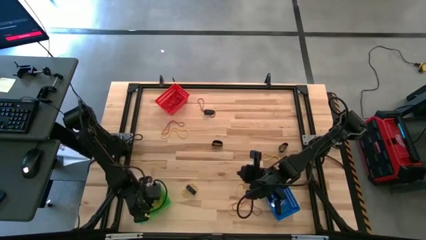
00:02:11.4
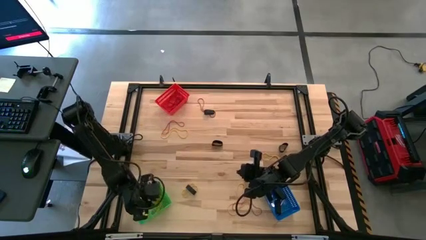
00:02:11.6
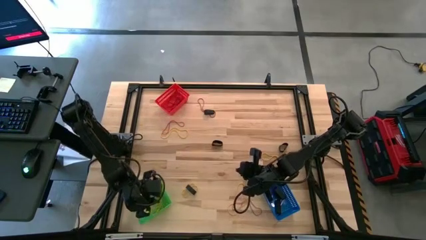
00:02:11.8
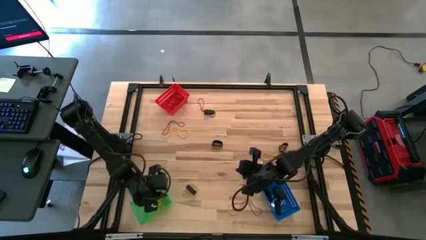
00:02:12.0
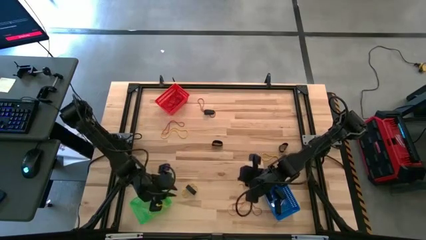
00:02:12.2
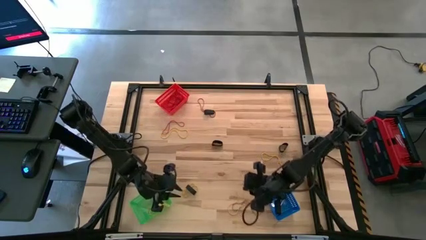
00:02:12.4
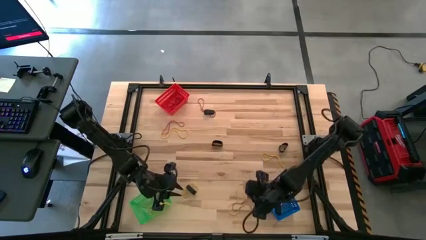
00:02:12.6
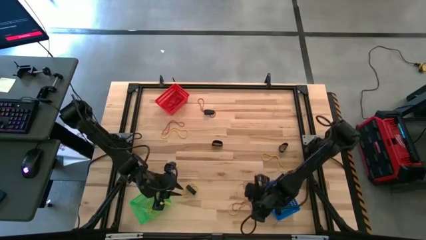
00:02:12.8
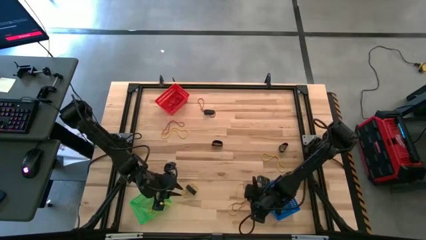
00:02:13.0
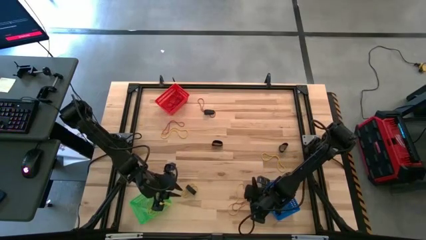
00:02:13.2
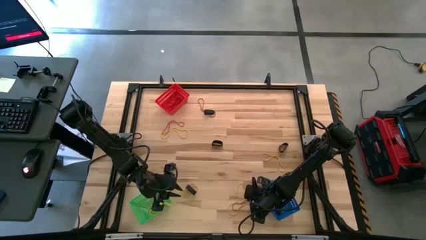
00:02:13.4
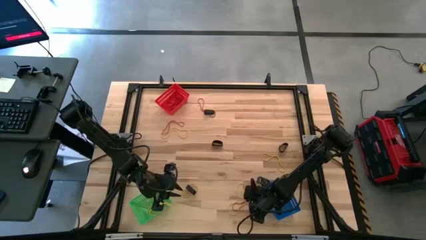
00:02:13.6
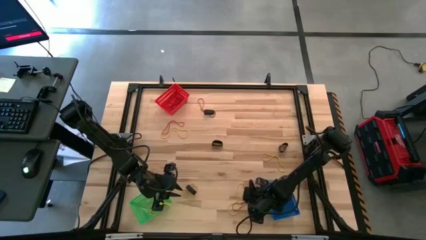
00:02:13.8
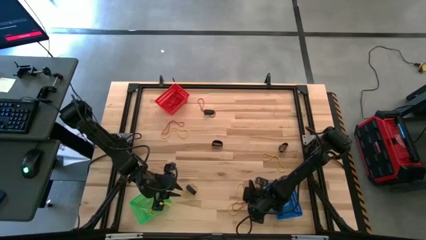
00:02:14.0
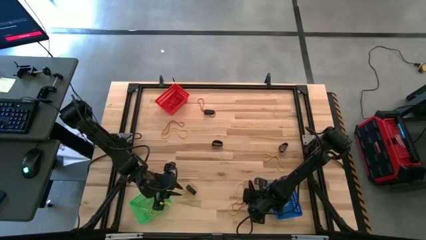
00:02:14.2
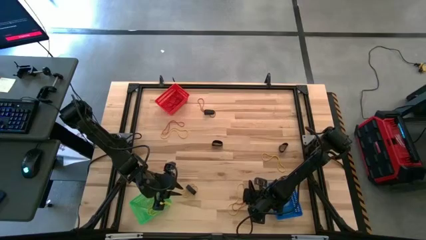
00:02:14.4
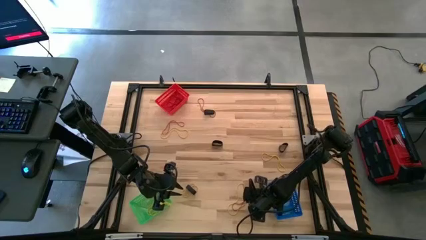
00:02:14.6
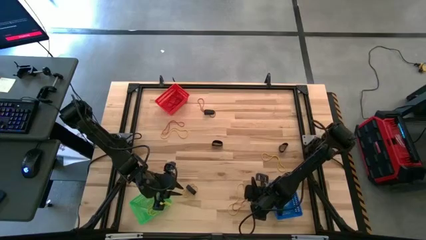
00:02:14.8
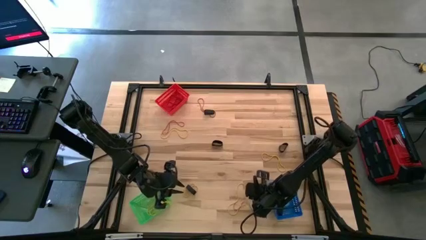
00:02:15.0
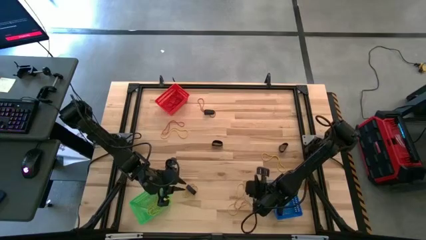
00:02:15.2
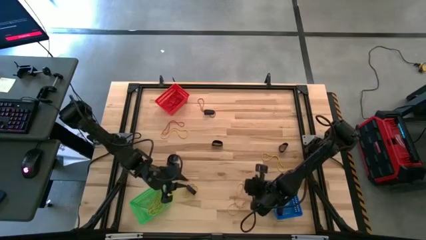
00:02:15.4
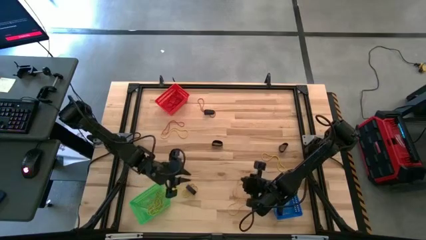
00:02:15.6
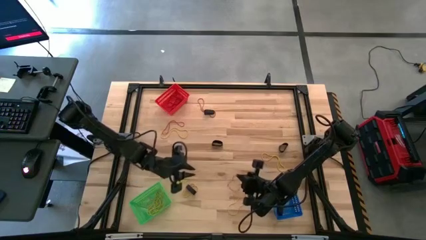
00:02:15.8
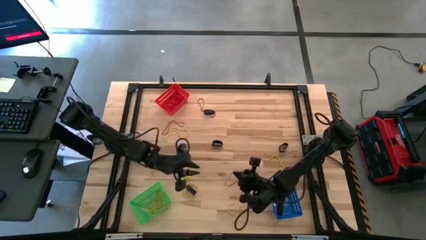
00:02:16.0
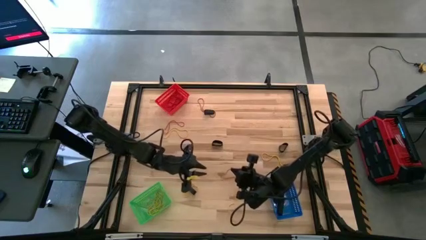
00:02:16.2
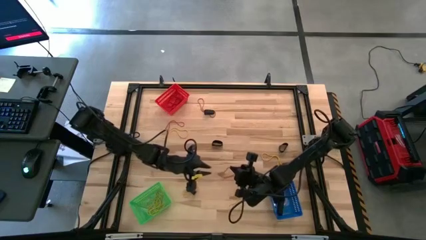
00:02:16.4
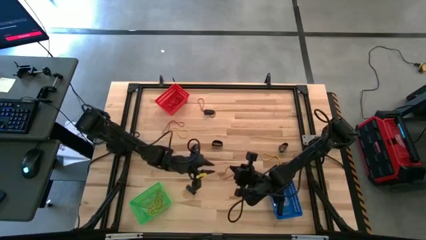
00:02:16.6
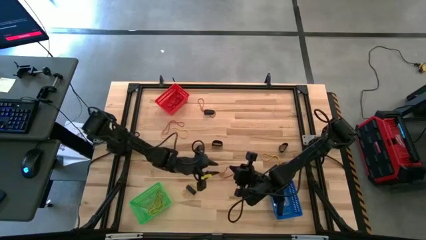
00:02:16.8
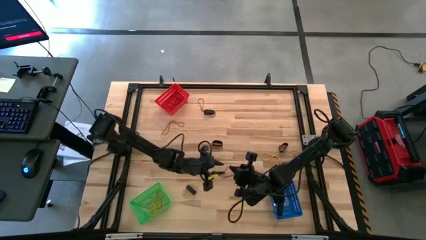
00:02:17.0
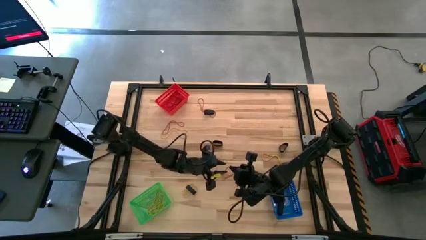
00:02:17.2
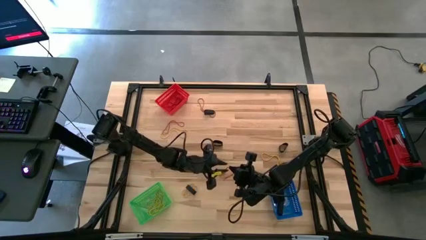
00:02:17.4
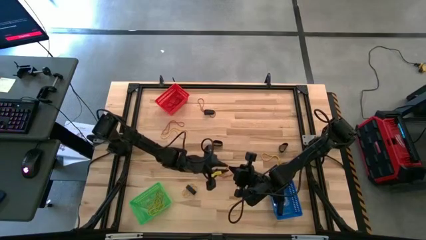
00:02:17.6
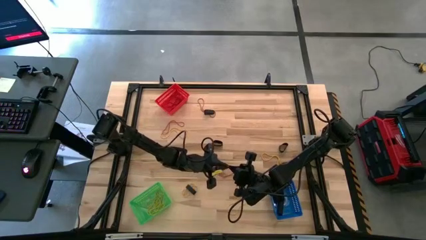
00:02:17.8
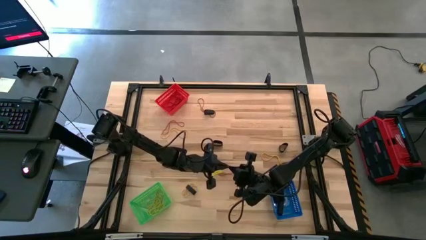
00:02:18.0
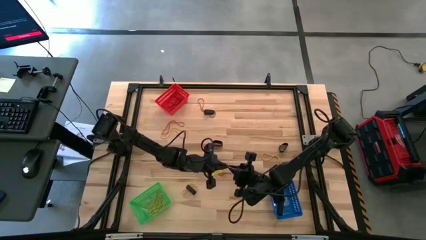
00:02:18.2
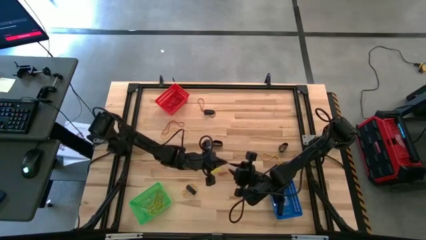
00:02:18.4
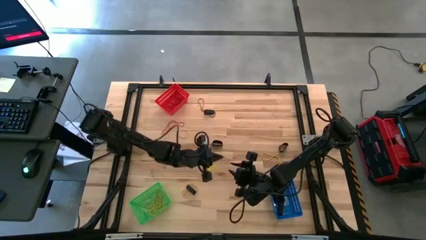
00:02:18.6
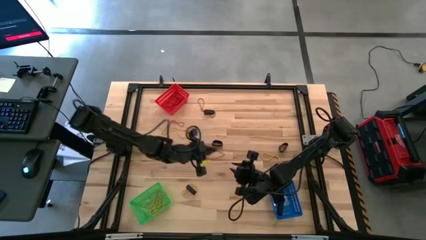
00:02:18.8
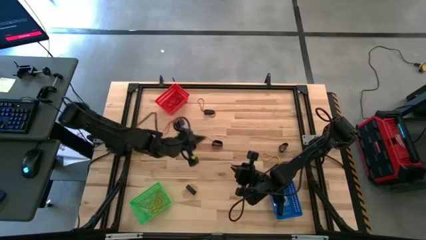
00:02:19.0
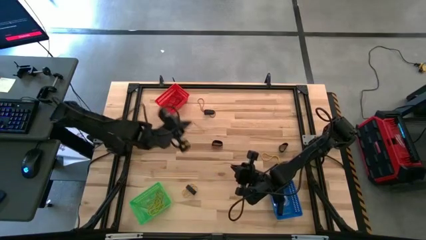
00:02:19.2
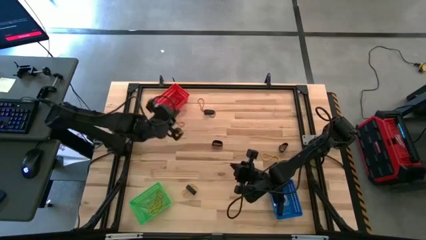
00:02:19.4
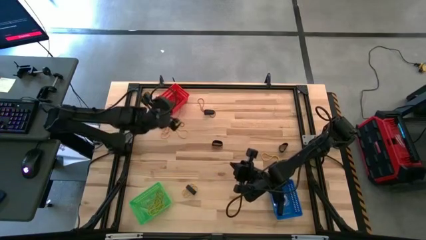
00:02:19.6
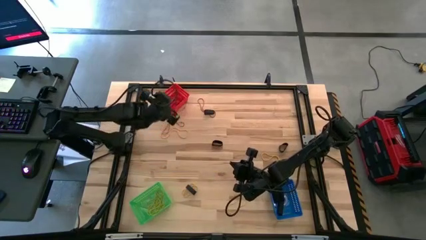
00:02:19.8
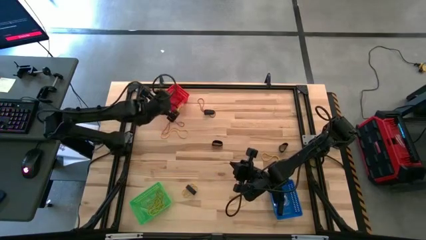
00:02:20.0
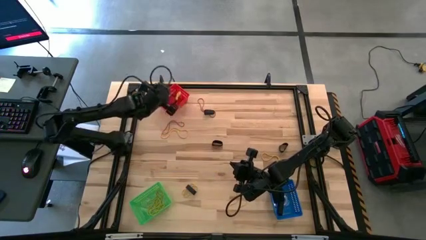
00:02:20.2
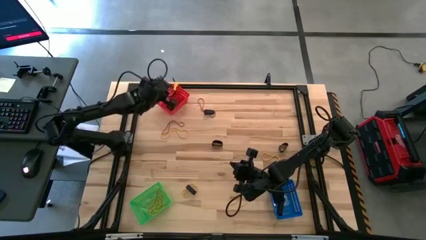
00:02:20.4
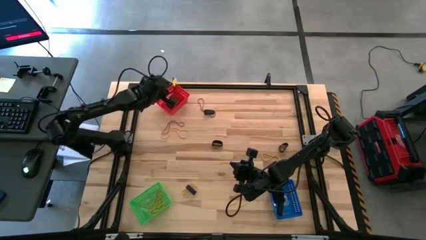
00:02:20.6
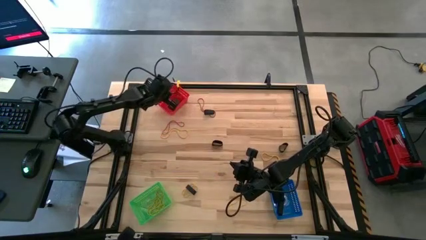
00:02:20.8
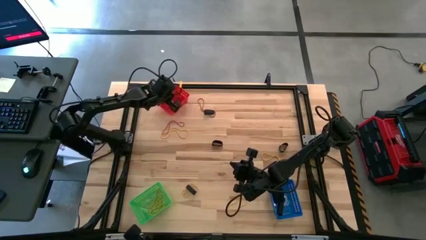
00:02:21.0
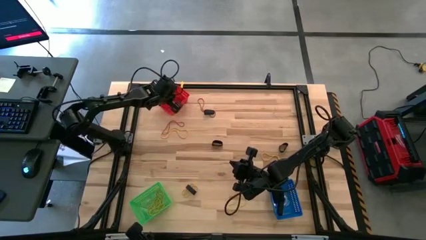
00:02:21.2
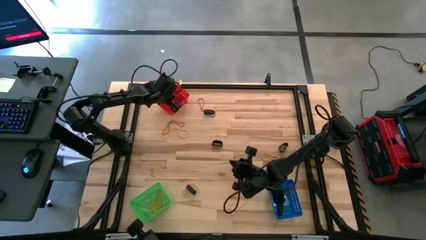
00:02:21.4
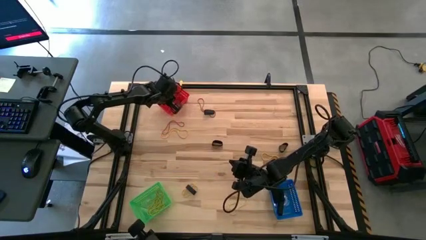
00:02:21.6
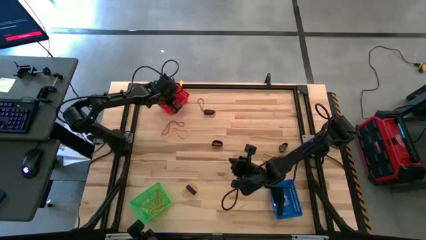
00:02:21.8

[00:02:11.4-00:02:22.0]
Task: Sort rubber bands into baskets
Put the red rubber band into the red basket

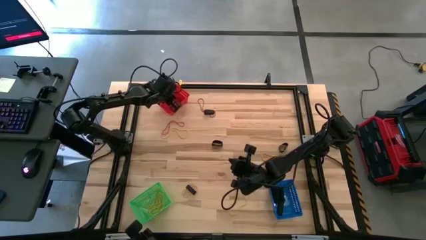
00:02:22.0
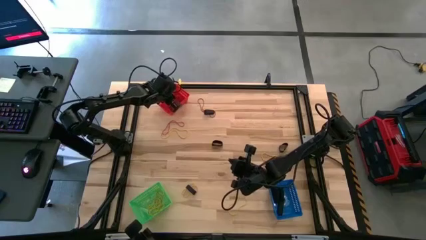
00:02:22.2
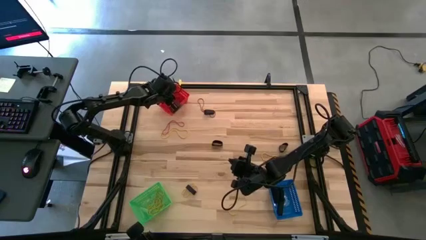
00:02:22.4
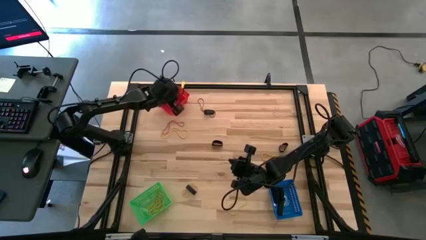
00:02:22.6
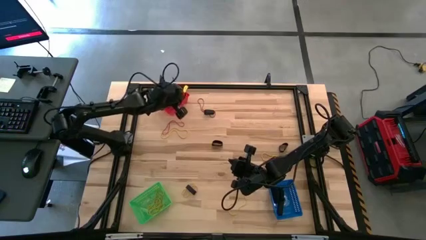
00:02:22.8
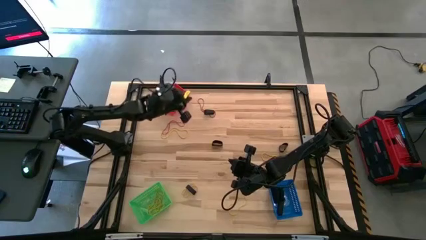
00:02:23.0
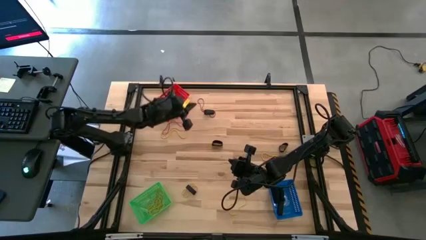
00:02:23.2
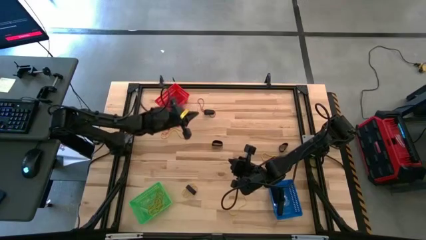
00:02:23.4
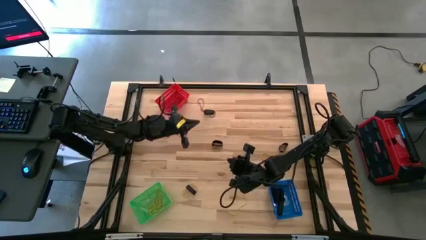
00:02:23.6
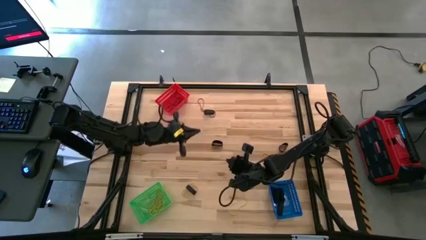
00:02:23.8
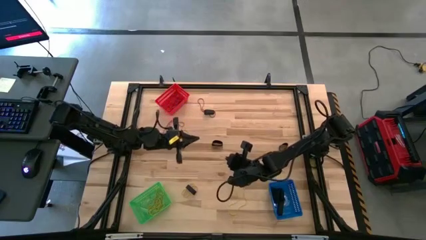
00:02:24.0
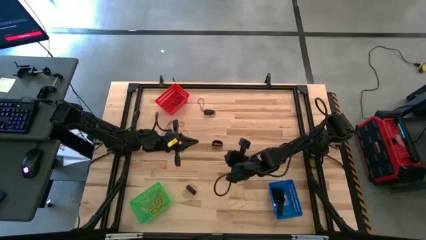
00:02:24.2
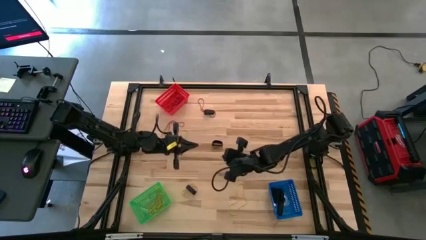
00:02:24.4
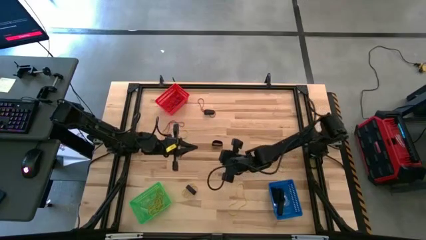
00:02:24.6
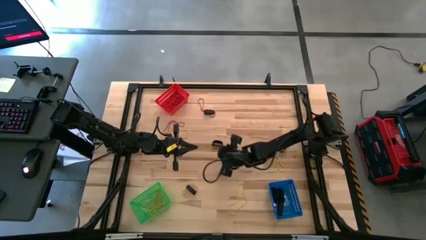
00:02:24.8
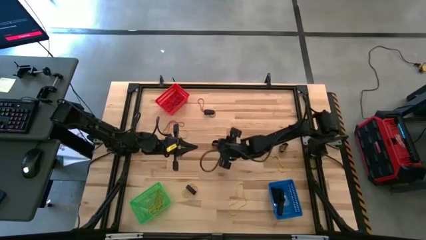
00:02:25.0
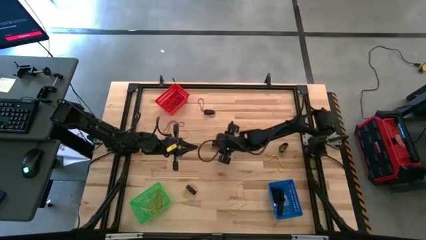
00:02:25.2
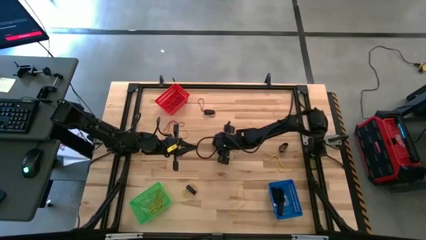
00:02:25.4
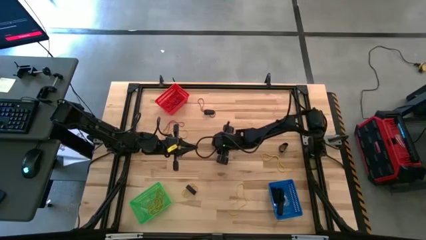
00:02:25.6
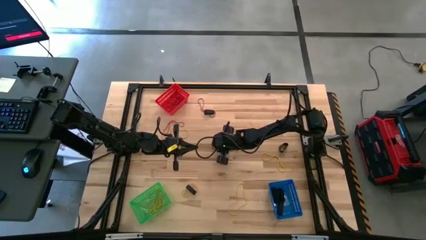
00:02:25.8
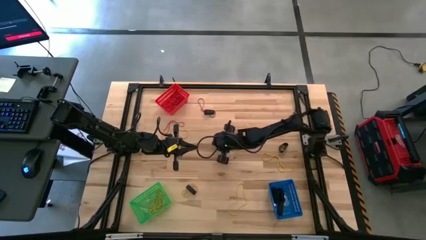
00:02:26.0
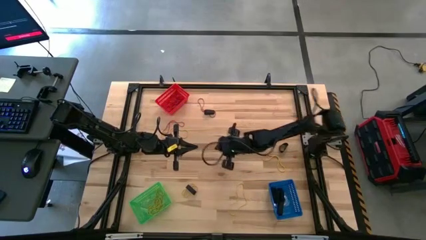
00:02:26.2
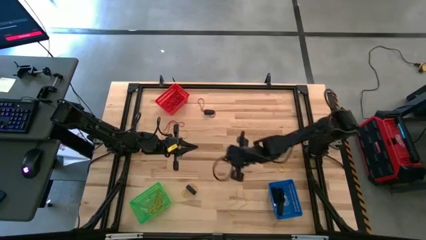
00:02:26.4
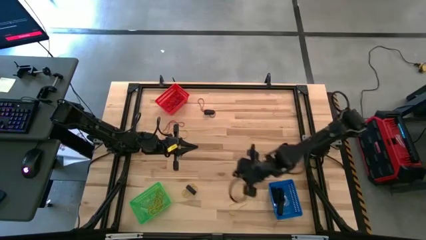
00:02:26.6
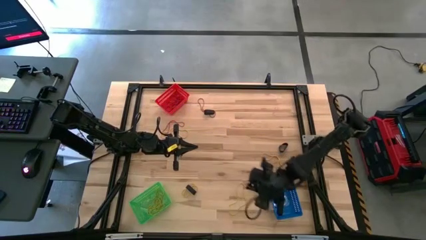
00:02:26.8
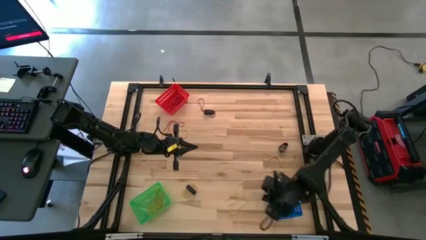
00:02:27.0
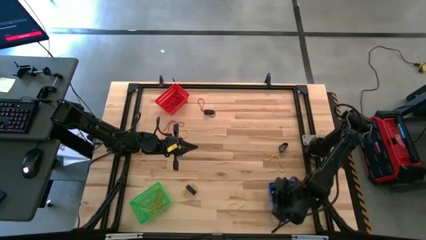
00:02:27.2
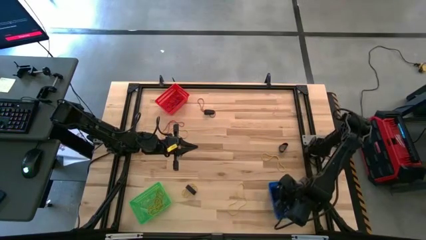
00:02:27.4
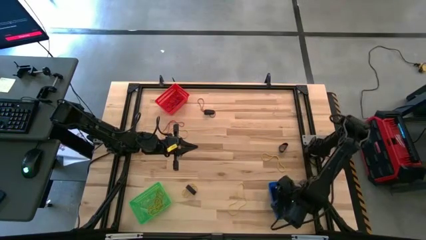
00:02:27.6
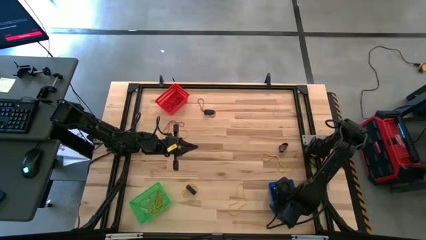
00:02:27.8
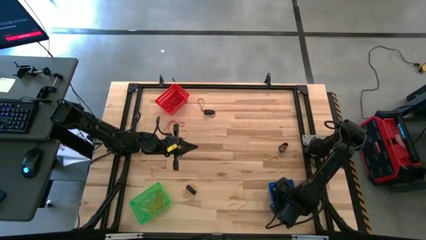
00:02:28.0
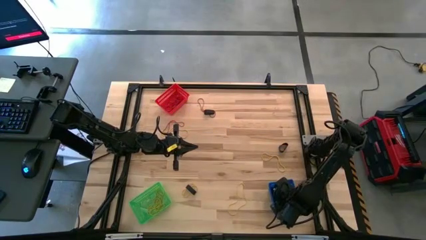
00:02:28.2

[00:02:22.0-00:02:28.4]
Put the black rubber band into the blue basket
